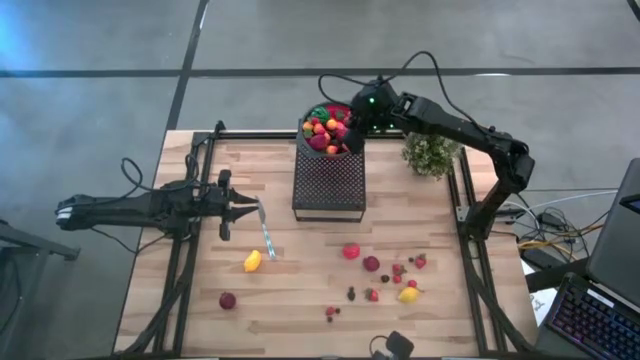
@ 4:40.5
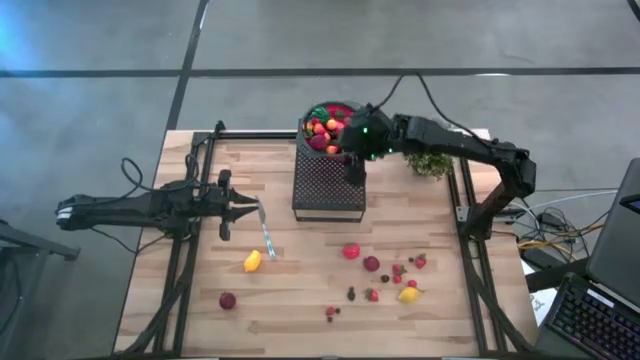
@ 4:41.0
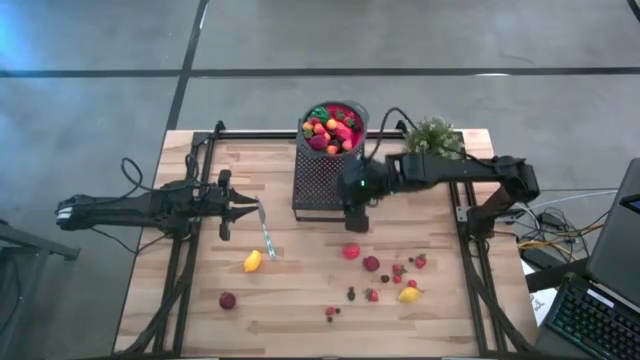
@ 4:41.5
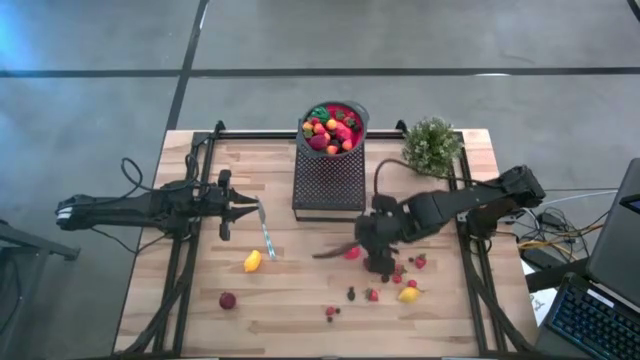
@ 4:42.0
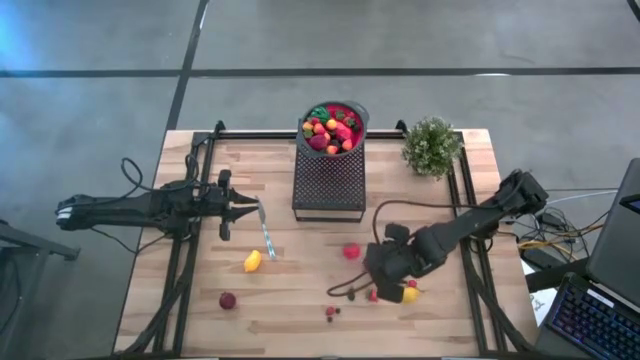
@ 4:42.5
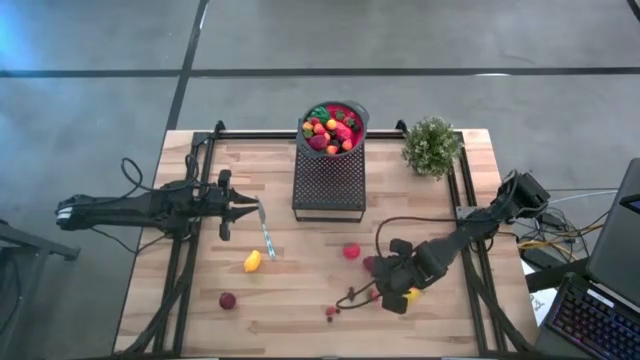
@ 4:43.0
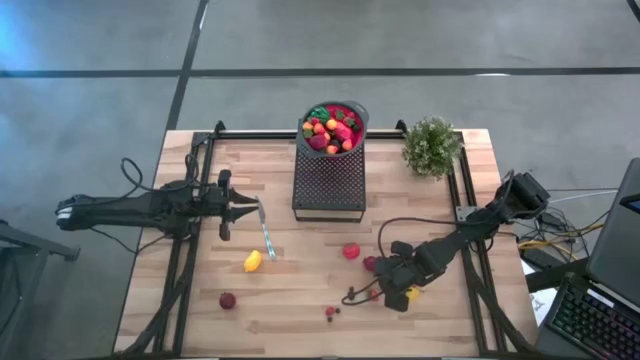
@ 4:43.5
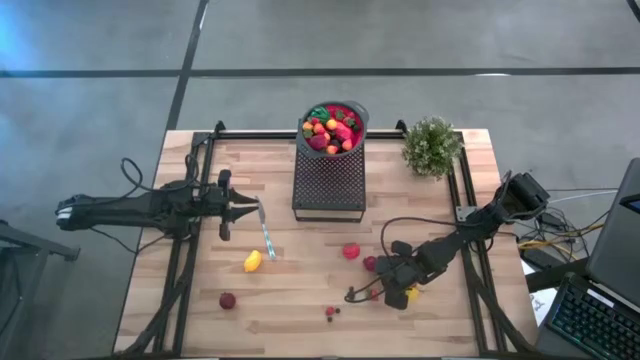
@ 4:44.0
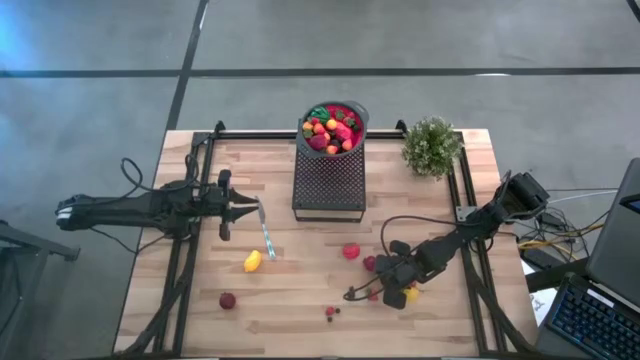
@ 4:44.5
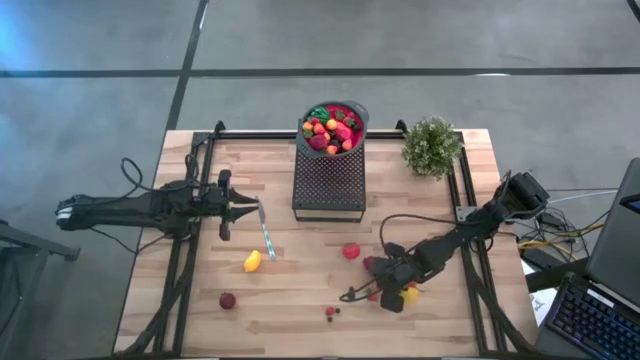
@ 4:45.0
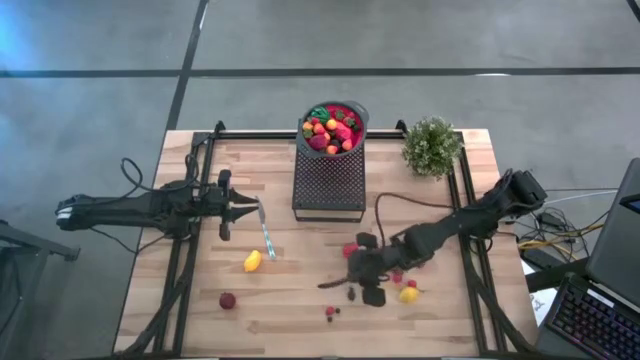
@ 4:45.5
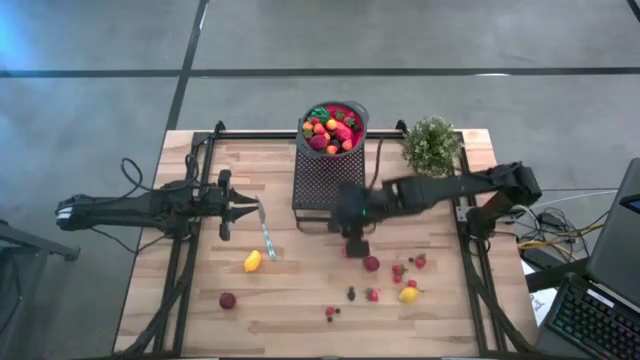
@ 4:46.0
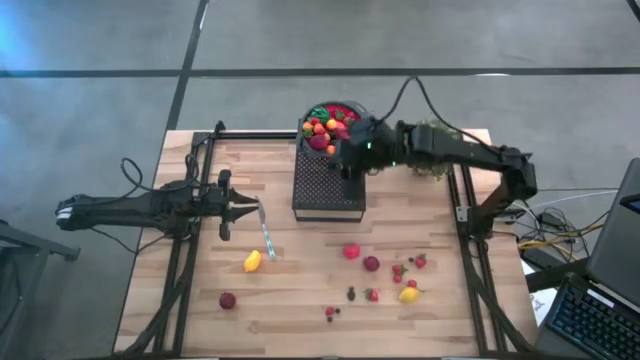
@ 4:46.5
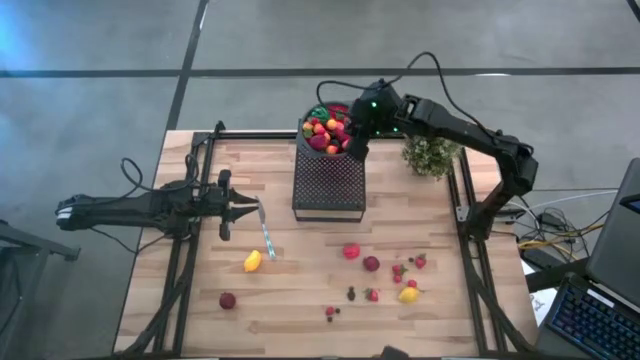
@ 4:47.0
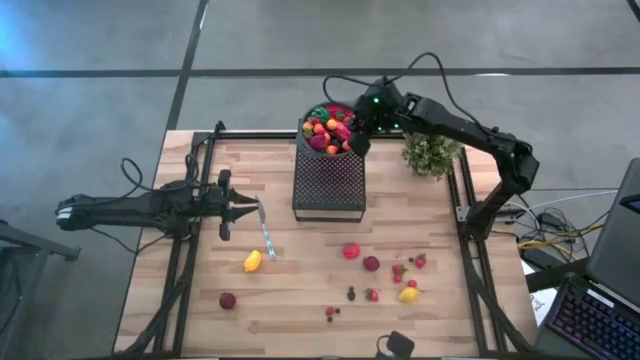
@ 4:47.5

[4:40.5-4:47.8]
Task: Pick & Place Fruit
Put the black cherry into the strainer bowl on the shelf

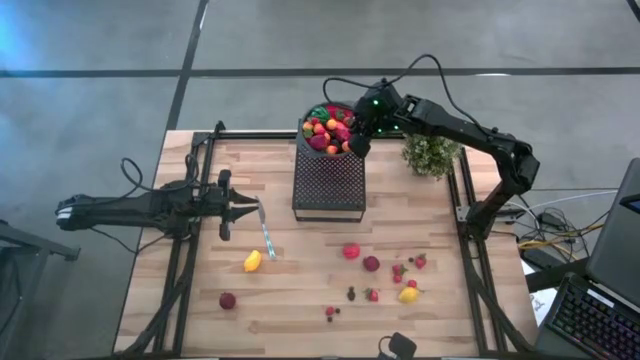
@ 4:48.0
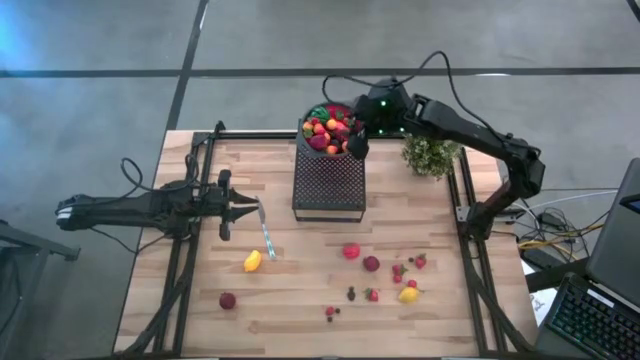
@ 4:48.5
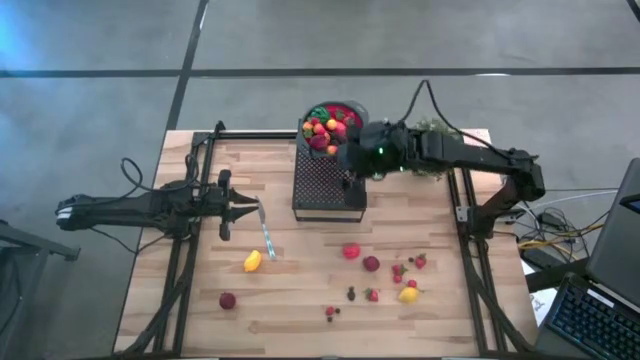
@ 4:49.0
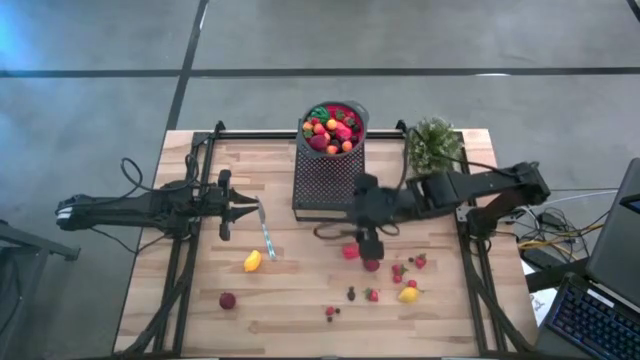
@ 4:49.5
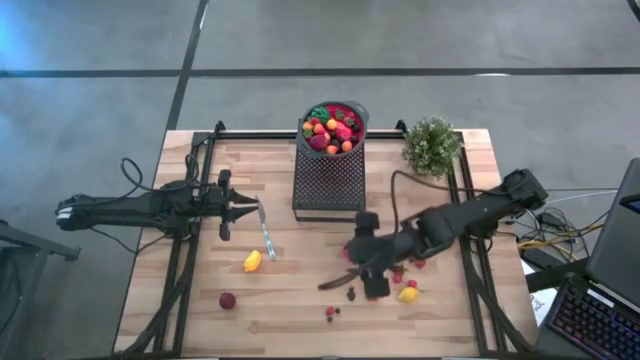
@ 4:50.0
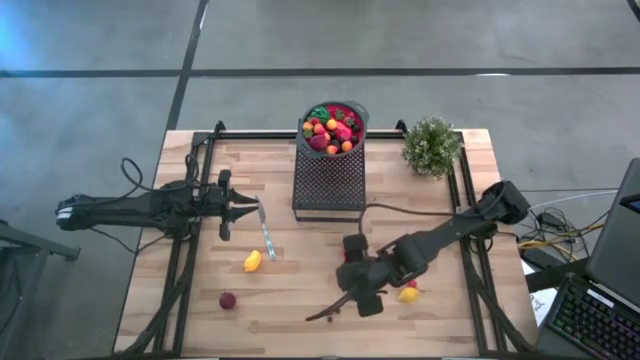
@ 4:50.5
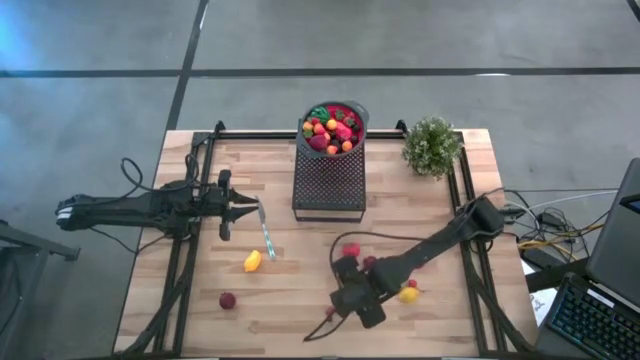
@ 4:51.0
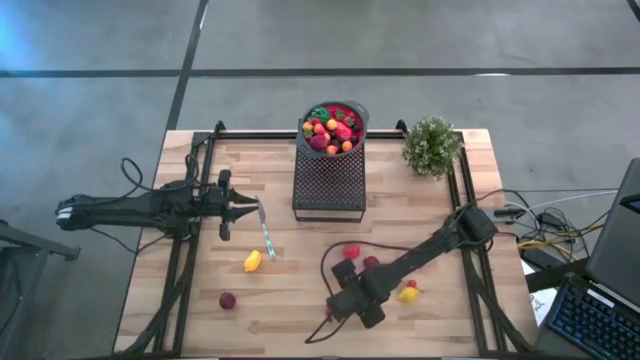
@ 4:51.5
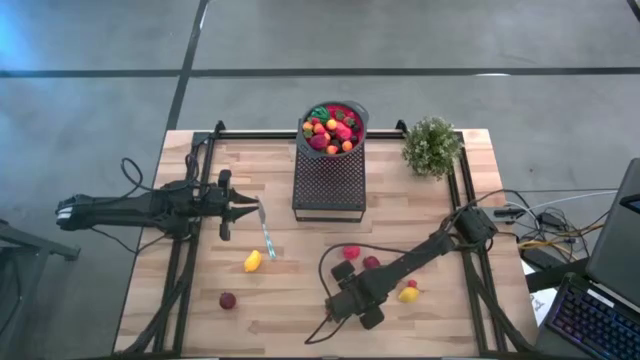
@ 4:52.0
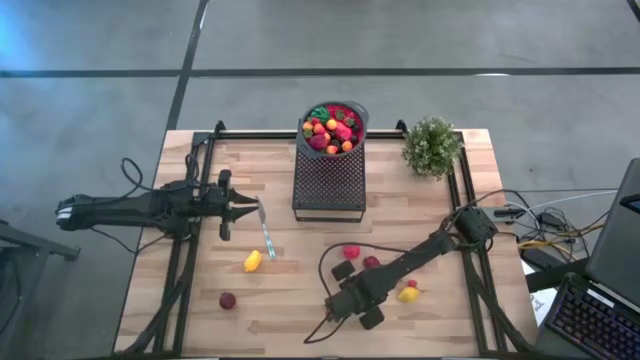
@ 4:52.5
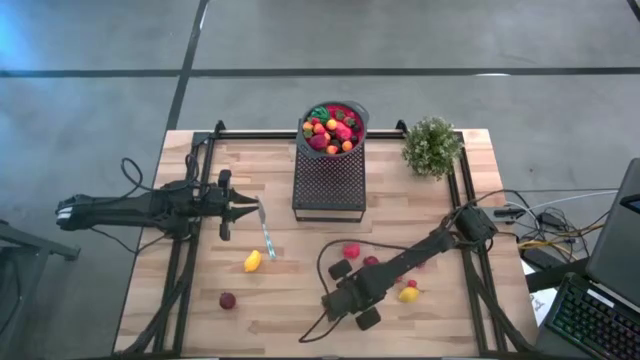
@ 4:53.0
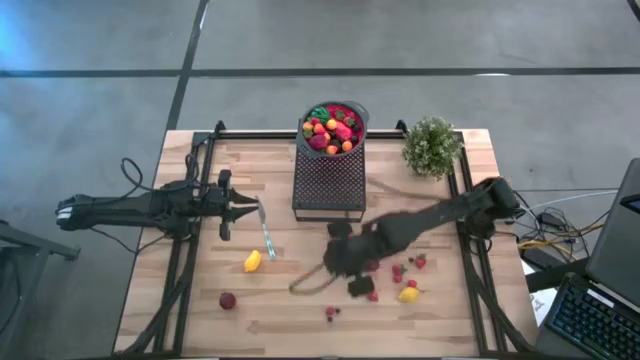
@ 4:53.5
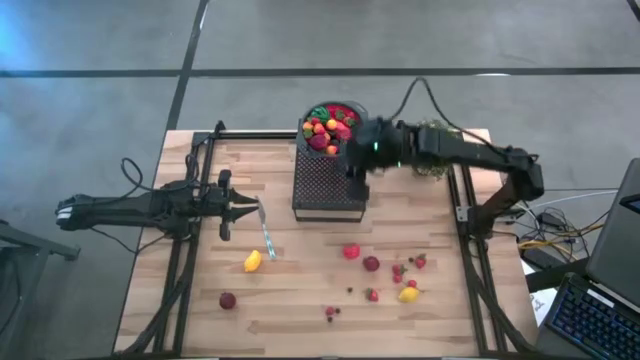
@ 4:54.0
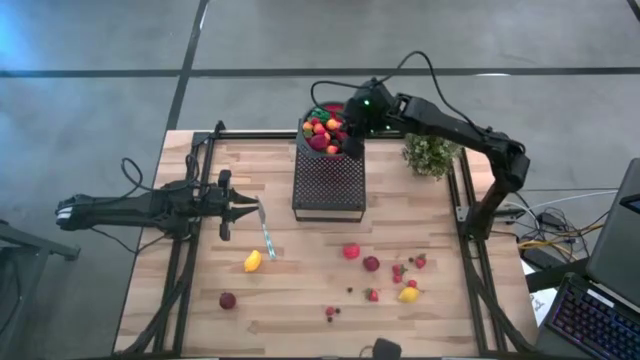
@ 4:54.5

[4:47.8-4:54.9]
Put the blackberry into the strainer bowl on the shelf

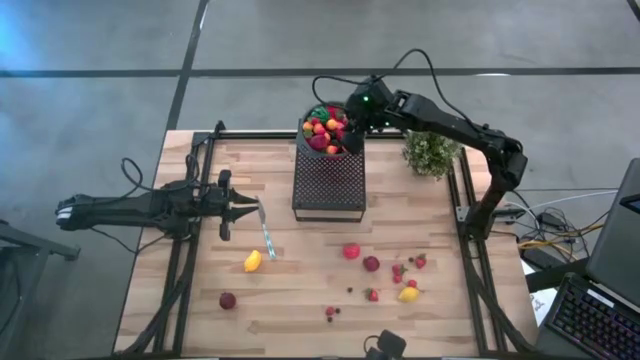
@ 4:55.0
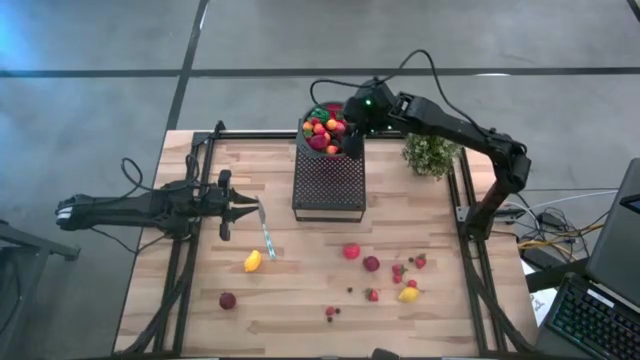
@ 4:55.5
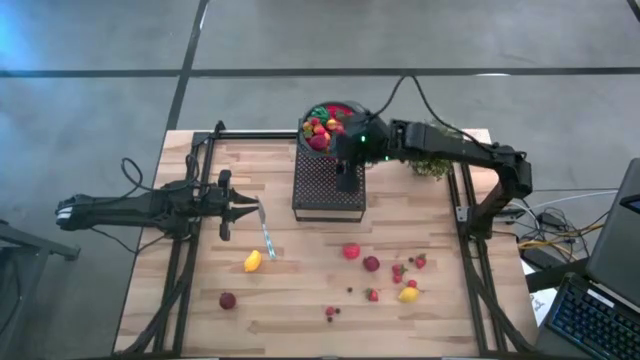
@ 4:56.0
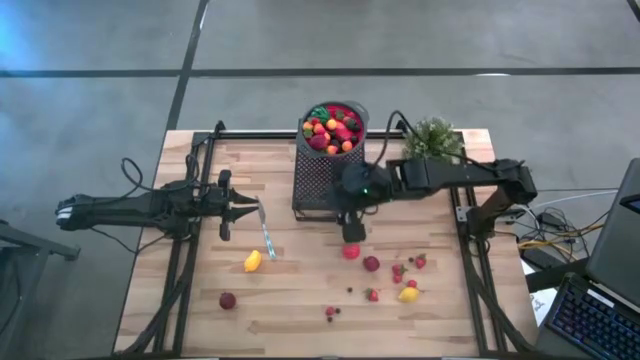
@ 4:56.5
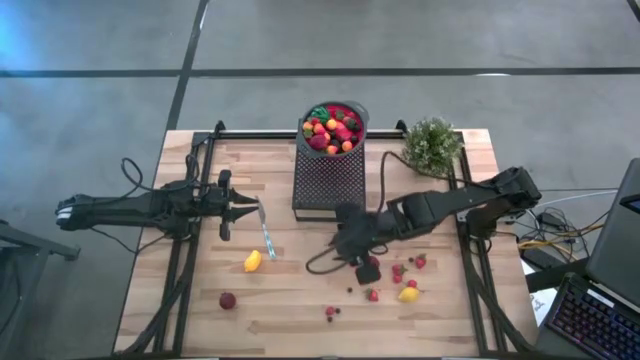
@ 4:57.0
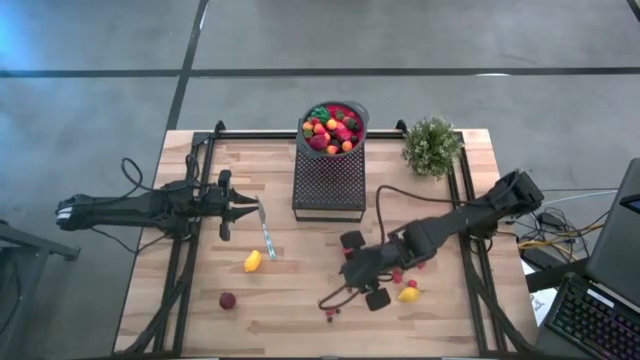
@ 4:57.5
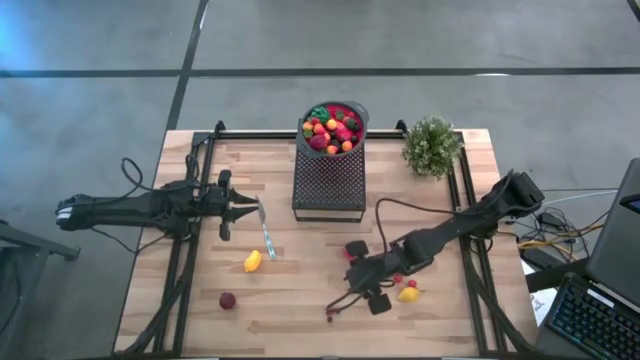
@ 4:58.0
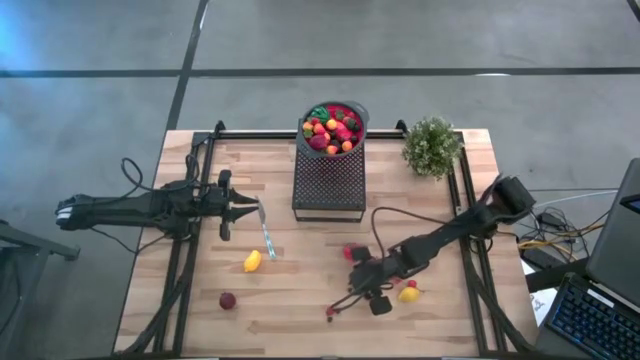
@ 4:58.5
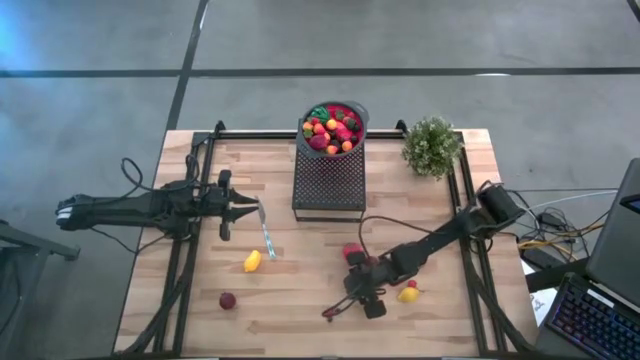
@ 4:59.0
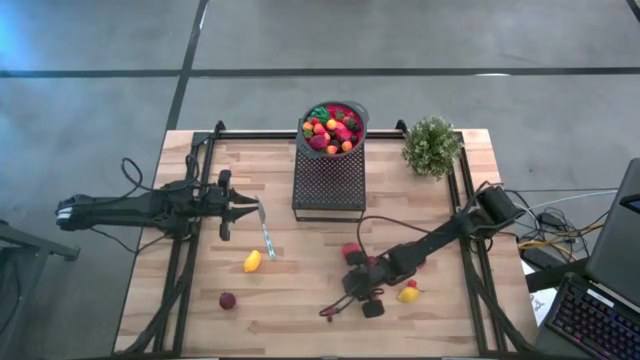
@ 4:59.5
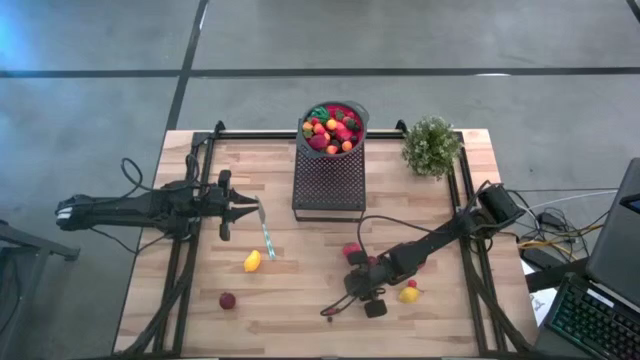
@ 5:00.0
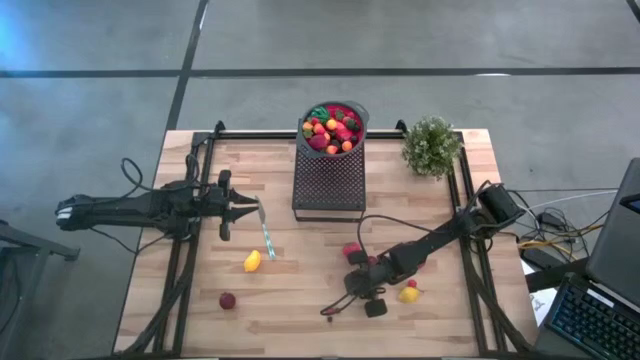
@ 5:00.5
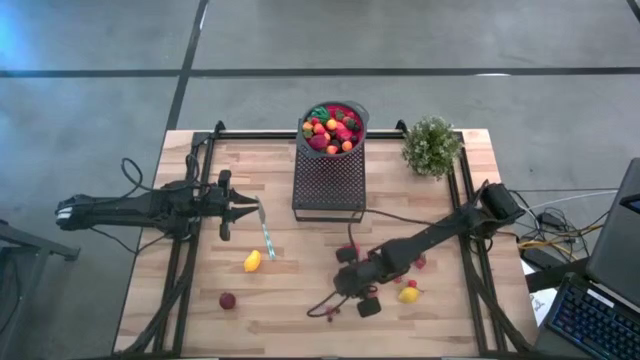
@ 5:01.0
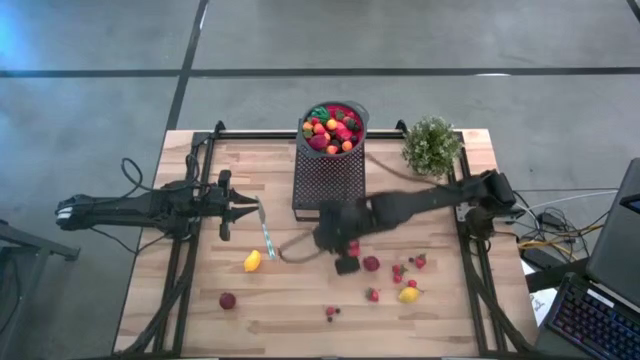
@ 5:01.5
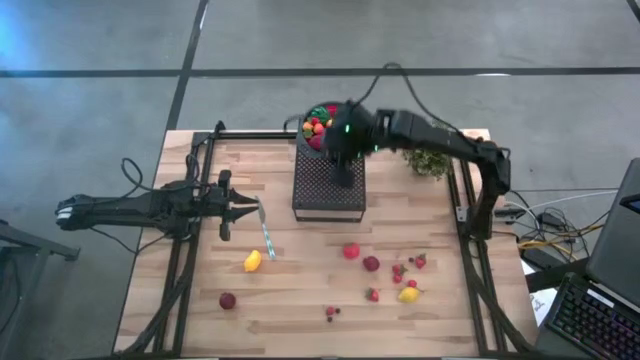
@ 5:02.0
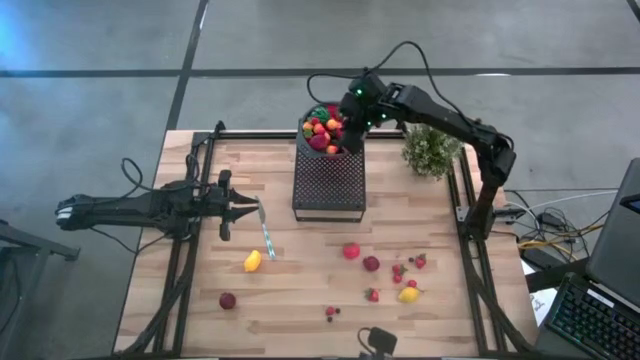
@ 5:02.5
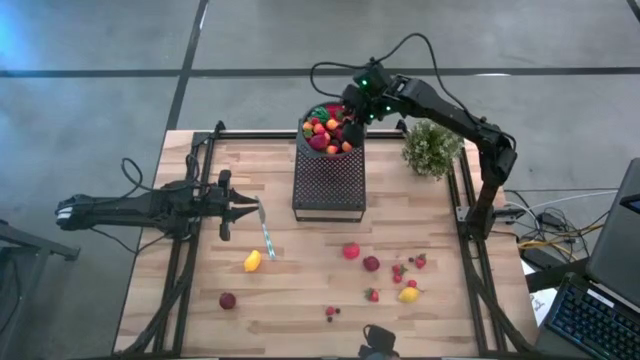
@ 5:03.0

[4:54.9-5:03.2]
Put the blueberry into the strainer bowl on the shelf
